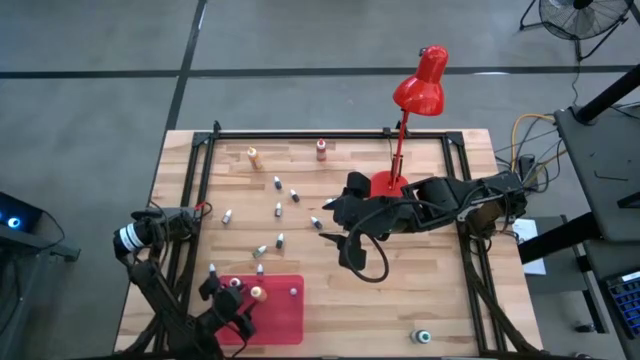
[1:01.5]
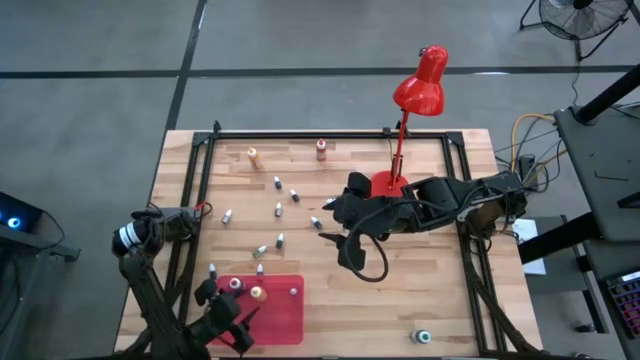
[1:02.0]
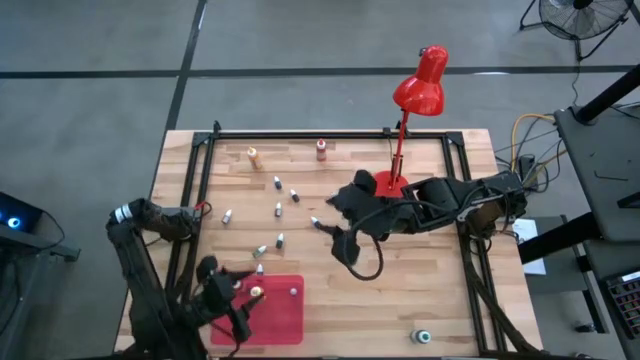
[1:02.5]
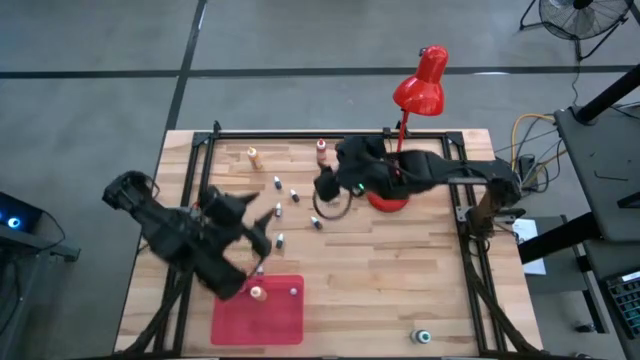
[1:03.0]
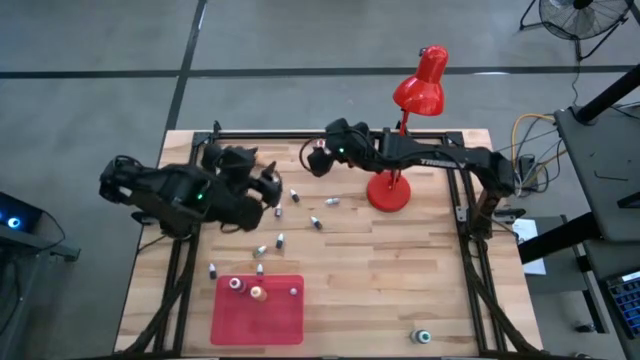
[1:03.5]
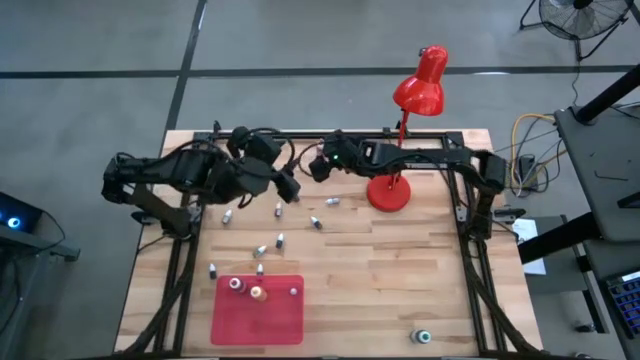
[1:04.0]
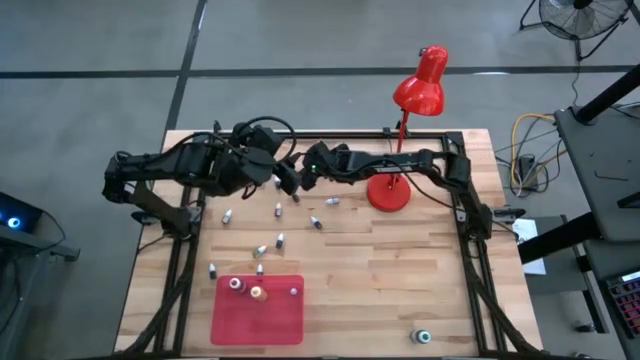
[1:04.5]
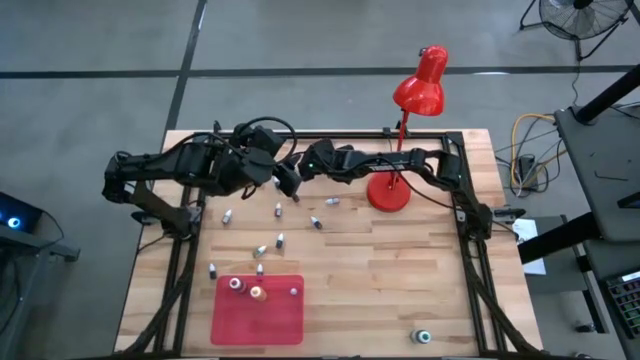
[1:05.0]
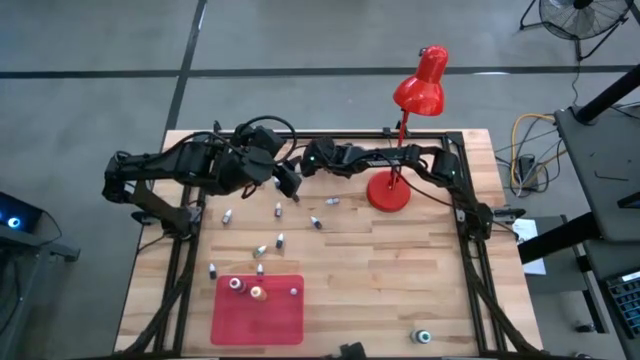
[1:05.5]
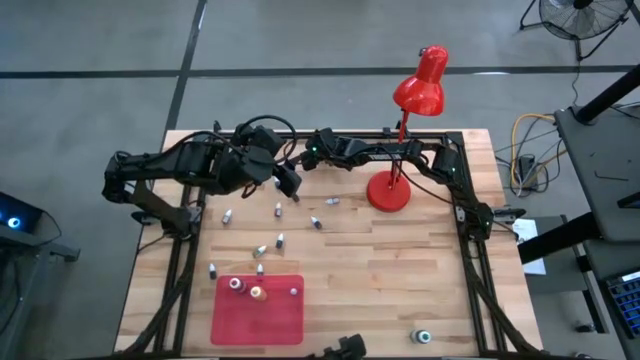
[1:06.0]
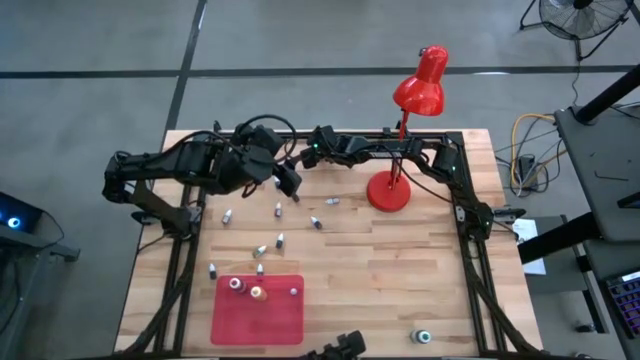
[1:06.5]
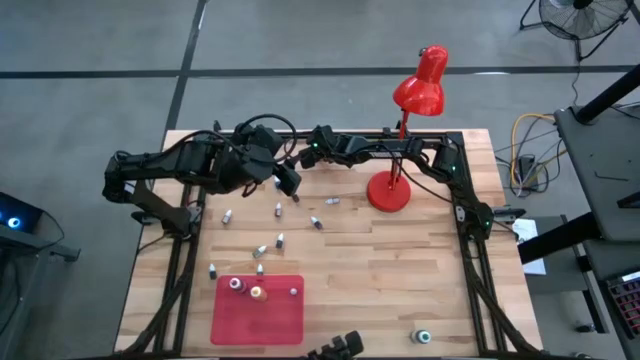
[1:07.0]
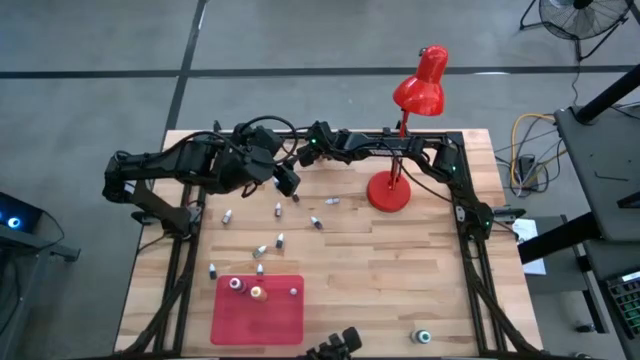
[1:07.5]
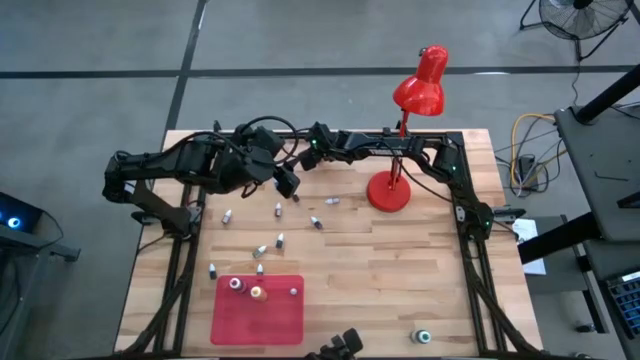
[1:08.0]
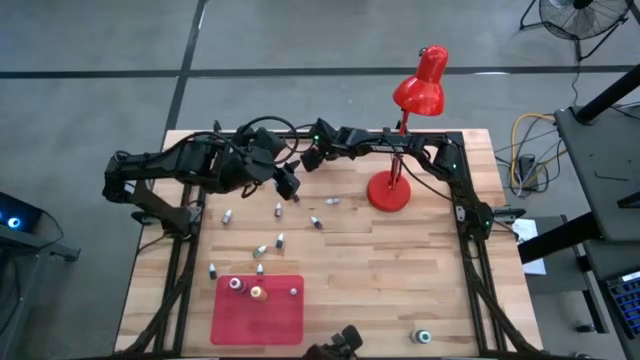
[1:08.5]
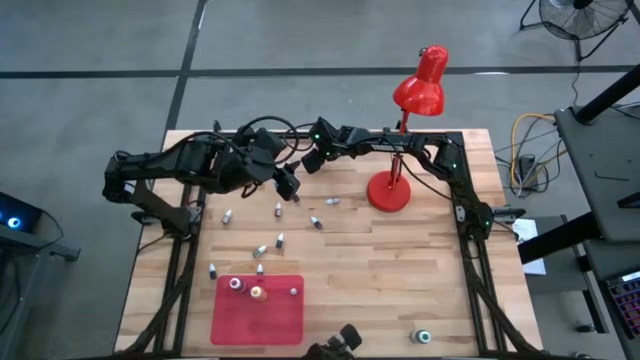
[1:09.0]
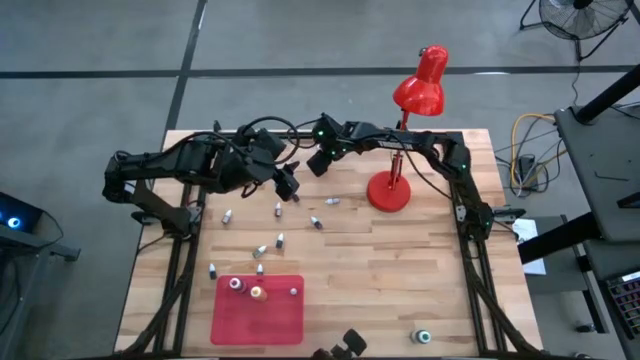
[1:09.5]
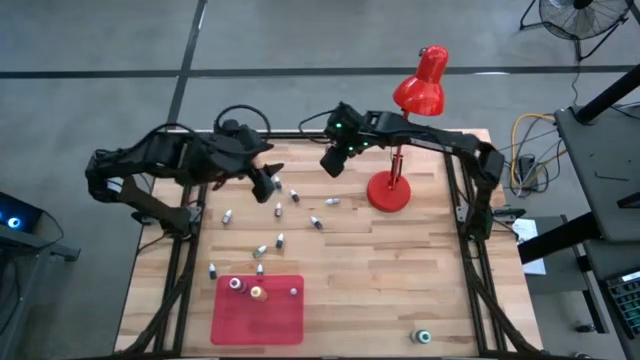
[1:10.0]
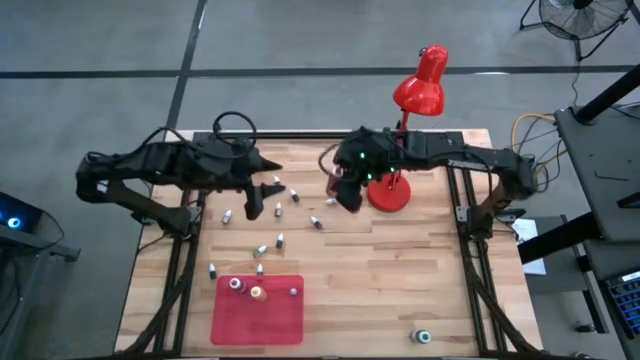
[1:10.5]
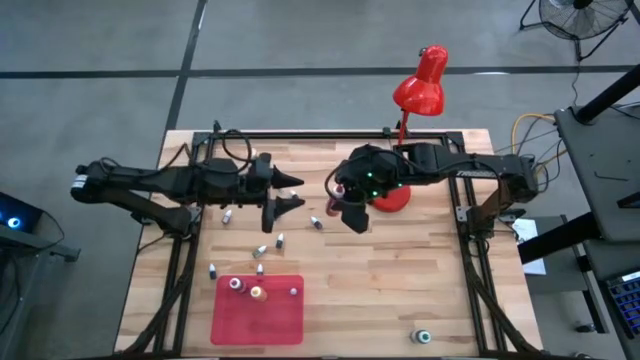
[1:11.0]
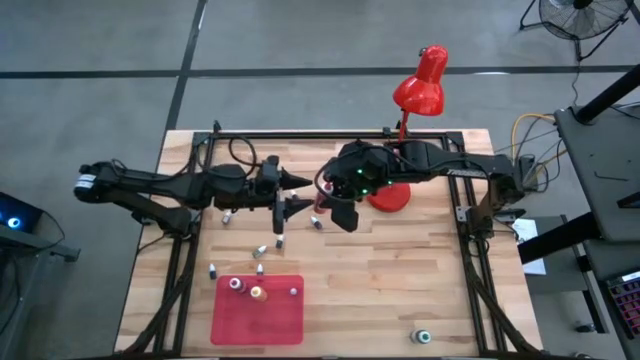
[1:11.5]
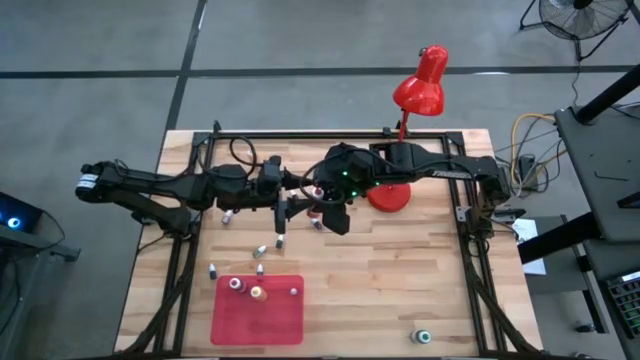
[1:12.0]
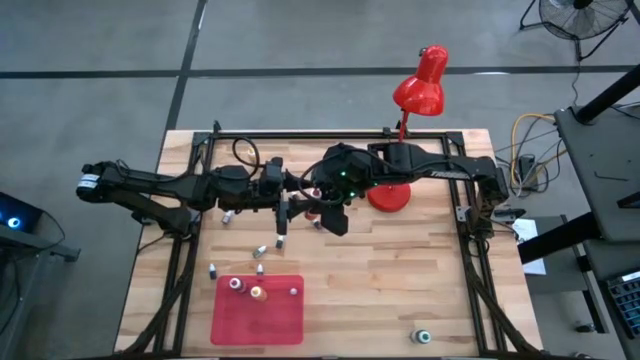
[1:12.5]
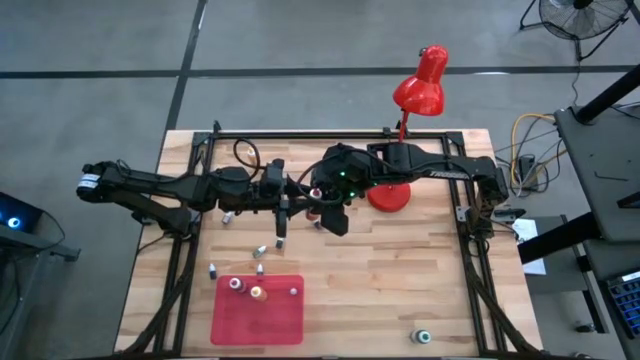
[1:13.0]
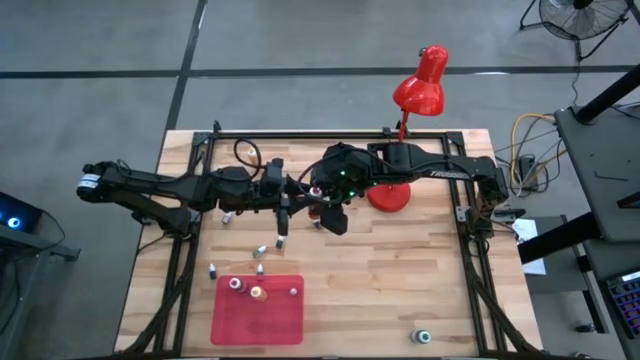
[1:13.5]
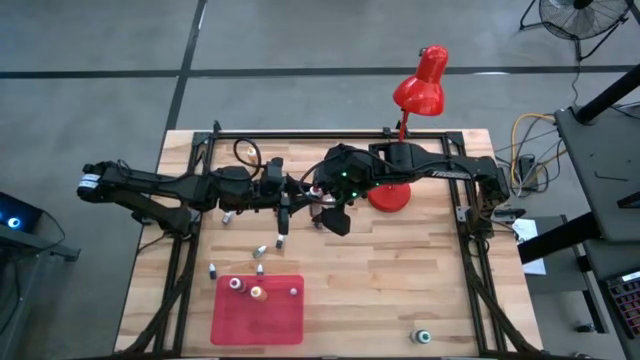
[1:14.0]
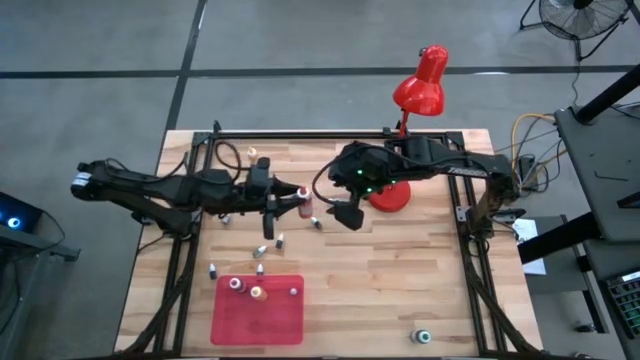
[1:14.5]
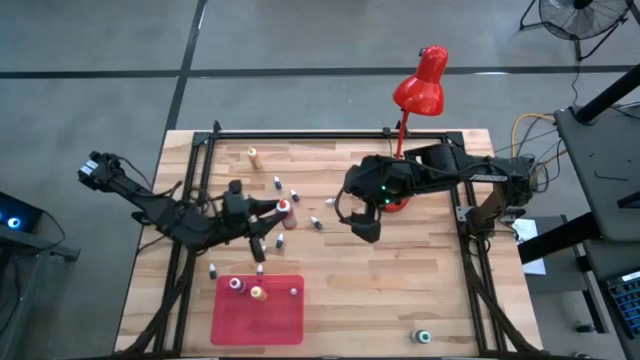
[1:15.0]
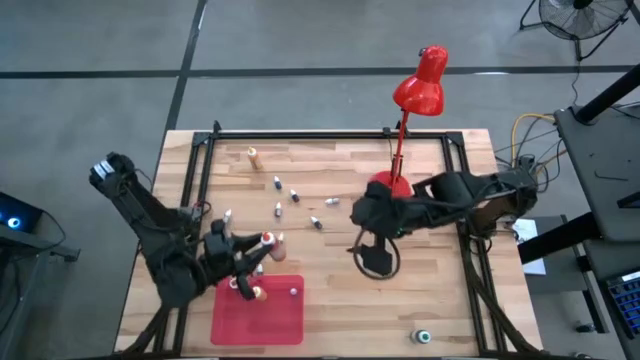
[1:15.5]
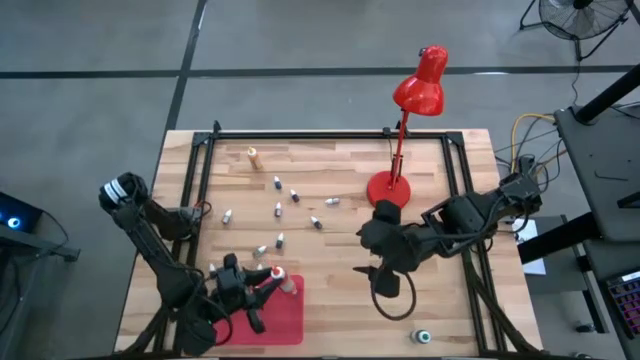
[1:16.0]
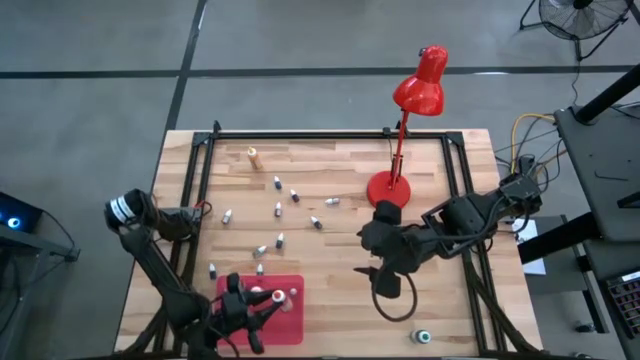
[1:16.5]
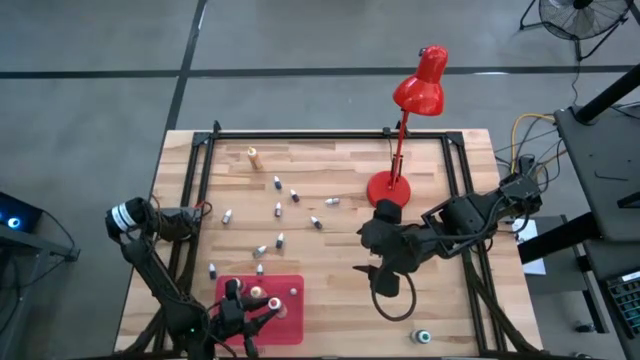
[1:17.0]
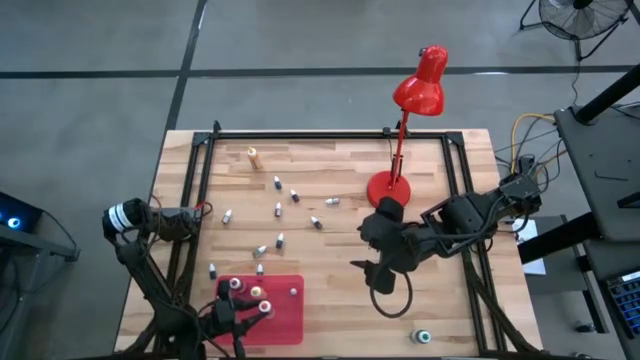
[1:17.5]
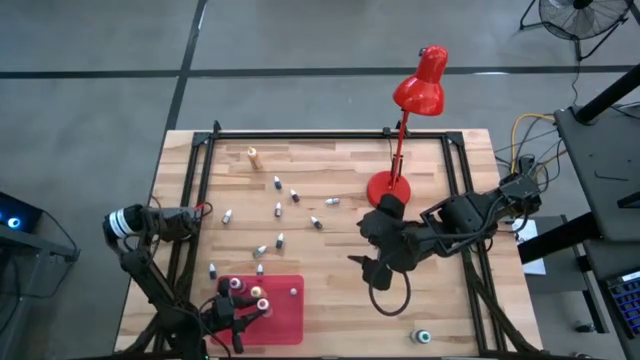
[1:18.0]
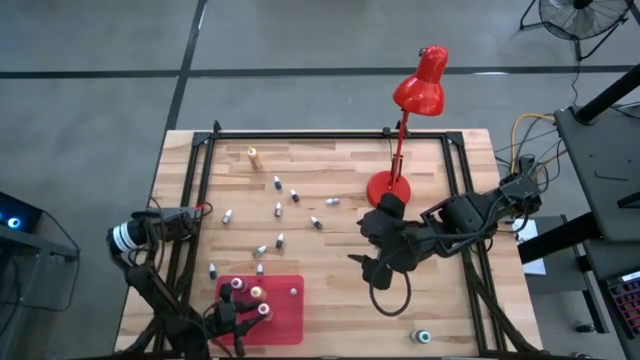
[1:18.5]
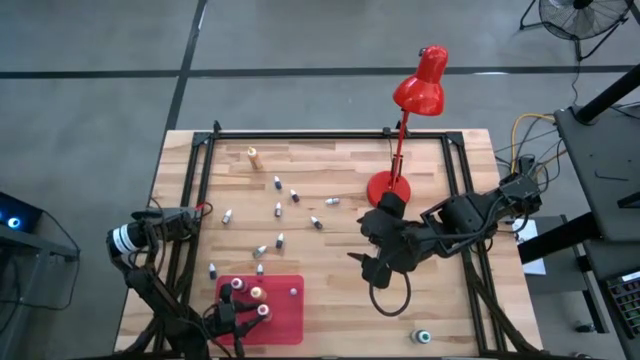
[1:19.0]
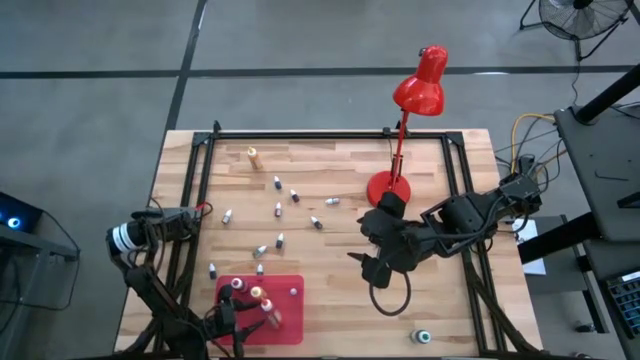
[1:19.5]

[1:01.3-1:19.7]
Task: Pick & Place food coloring
Put the large orange food coloring bottle into the red bin

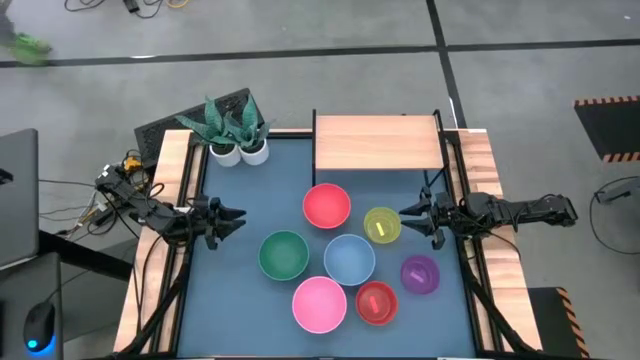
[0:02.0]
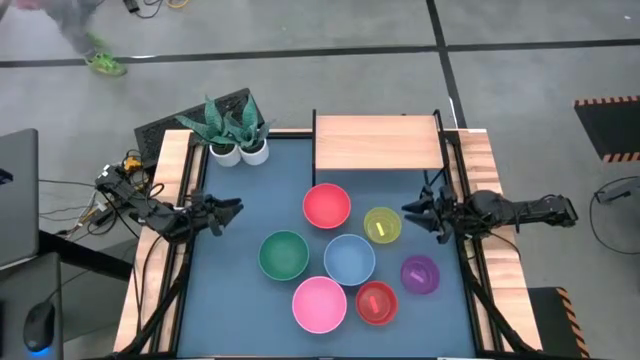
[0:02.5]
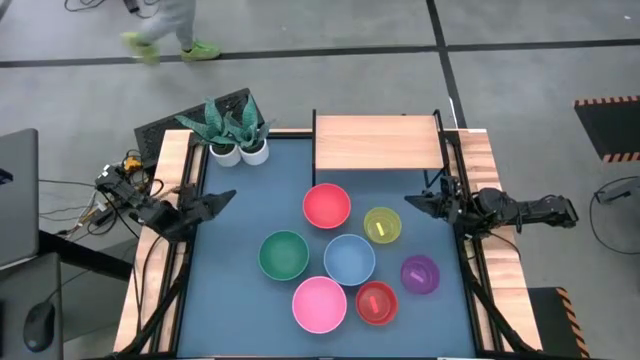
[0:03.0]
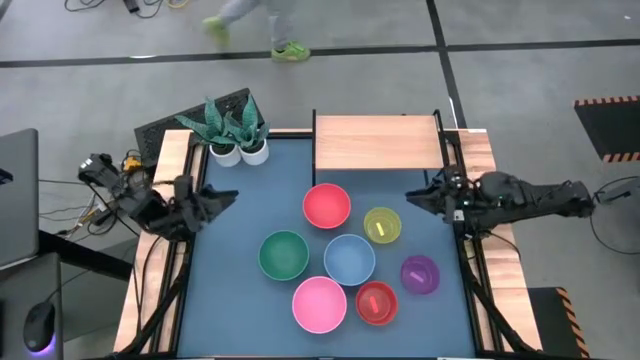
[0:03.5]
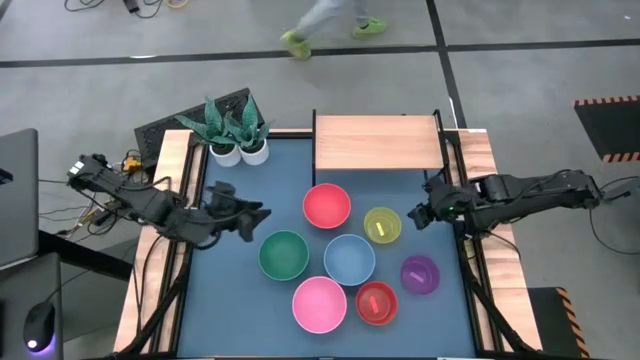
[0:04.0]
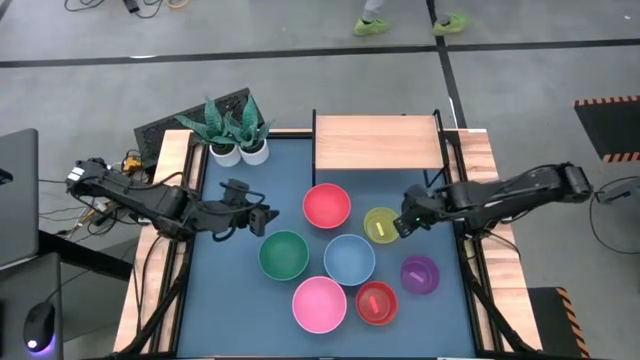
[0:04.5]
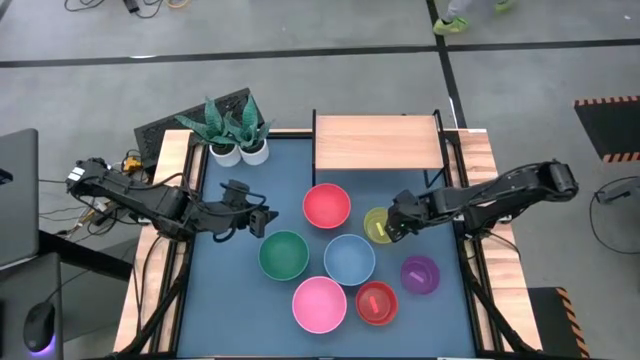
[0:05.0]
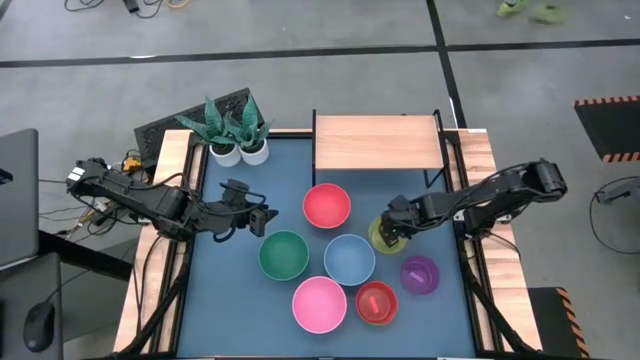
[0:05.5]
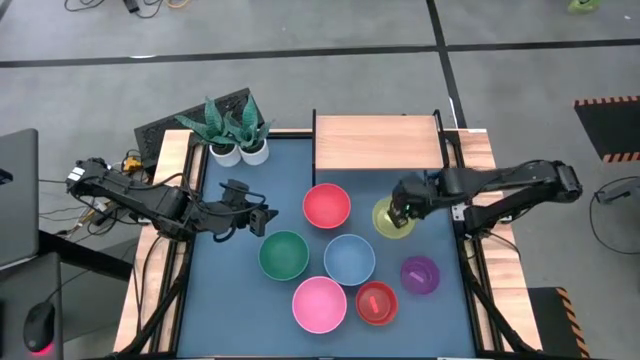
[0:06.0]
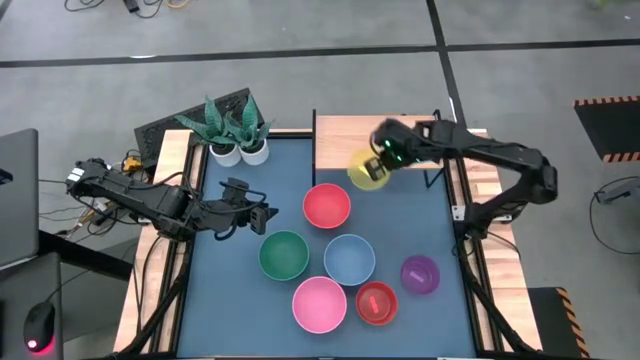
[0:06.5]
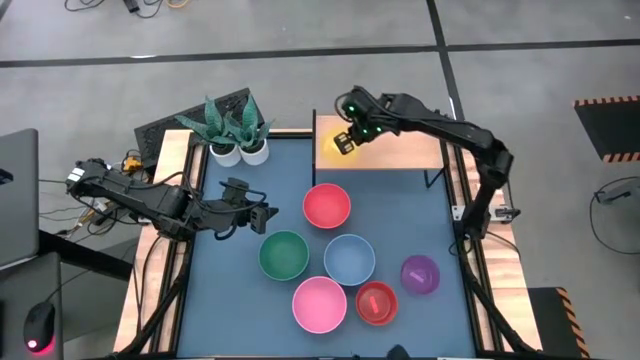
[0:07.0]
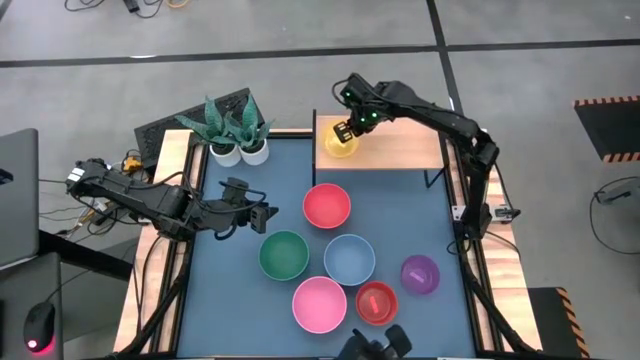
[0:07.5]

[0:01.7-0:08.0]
Task: Place and stack bowls onto a shelf
Put the yellow transparent bowl on the shelf
